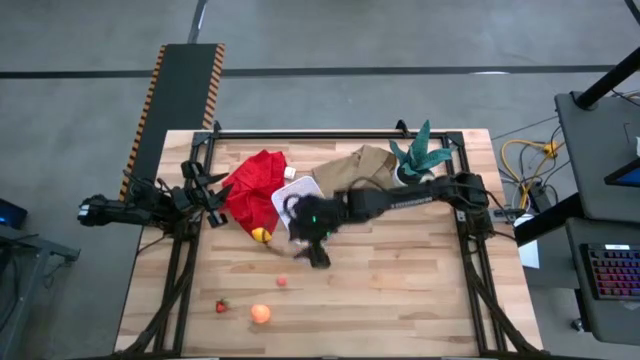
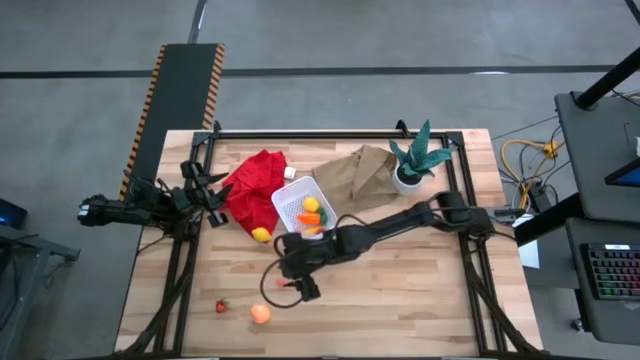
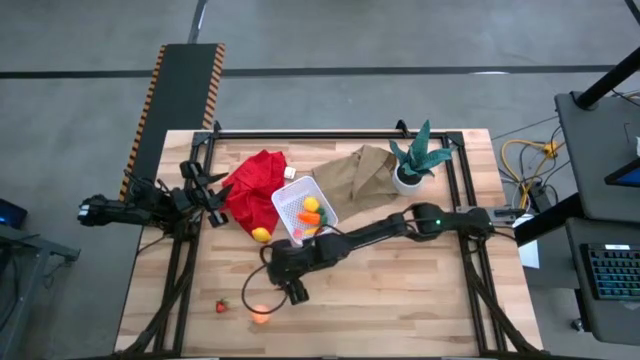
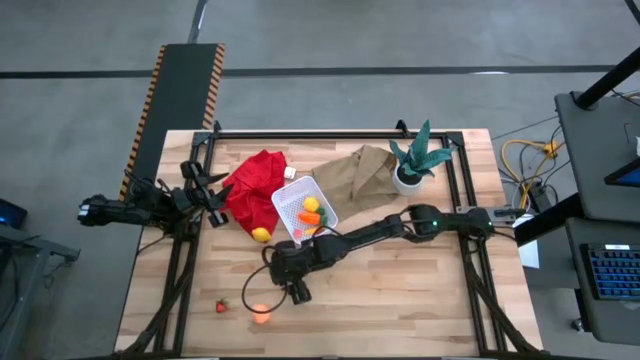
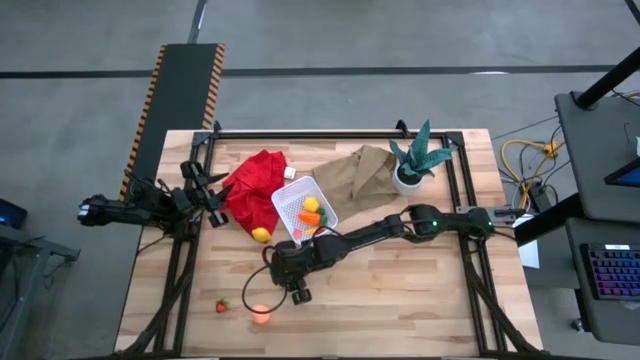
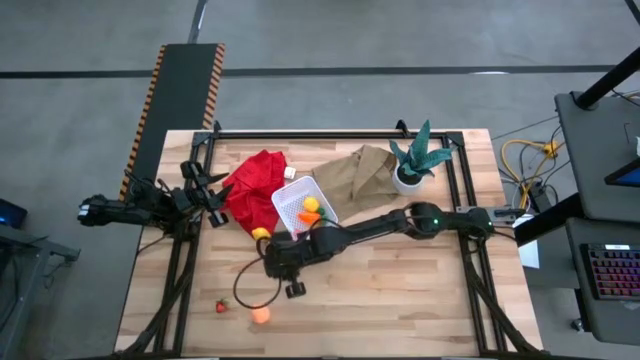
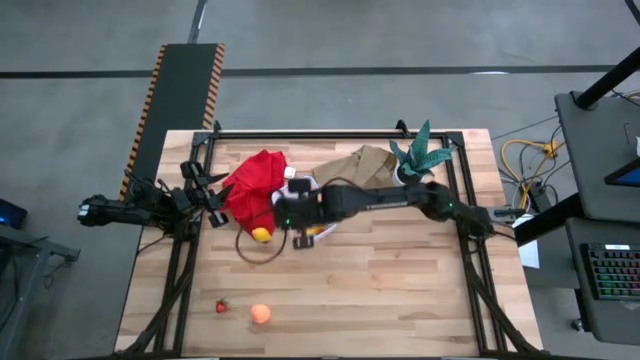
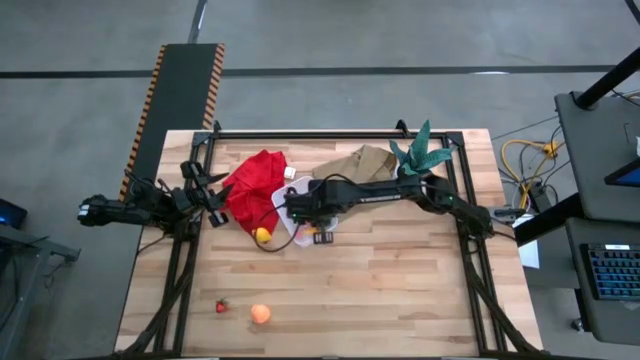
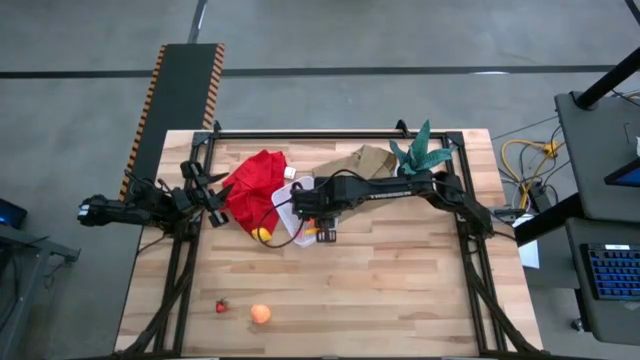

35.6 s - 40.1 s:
Task: Pick and placing Produce into tupperware
Put the toy raspberry into the white bin

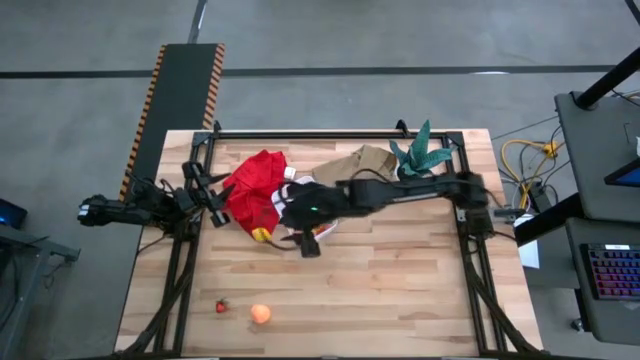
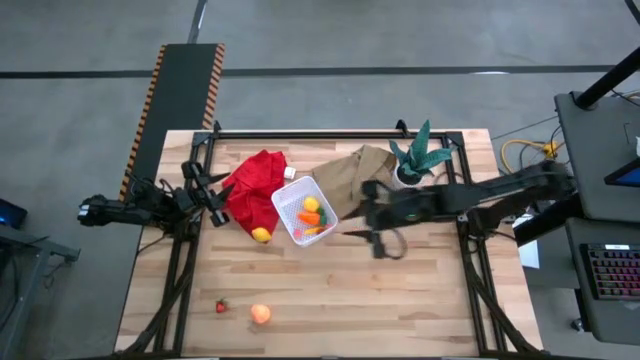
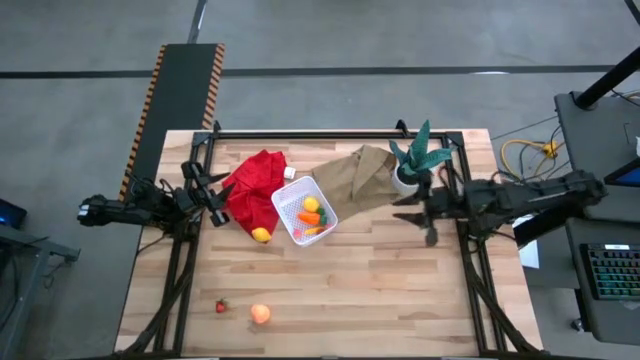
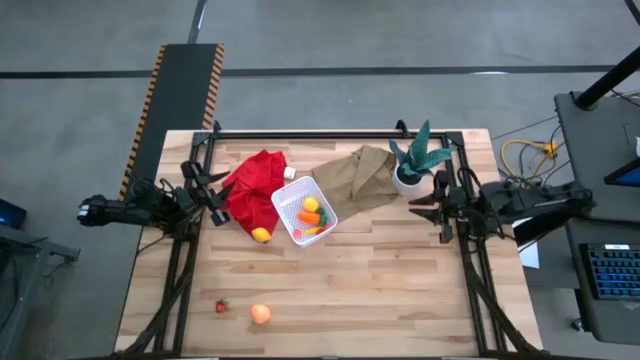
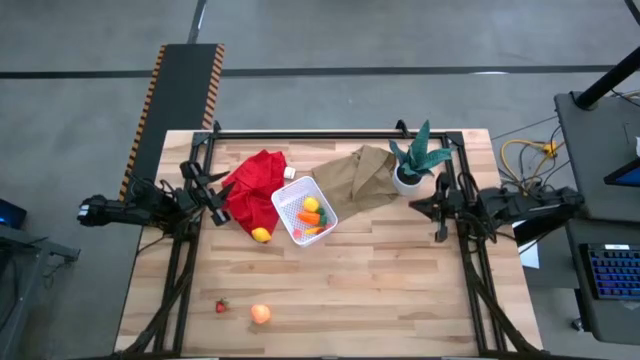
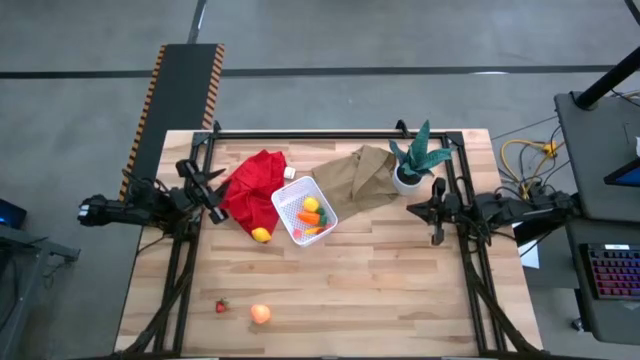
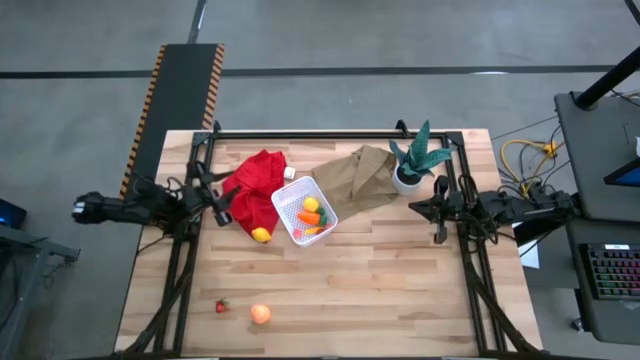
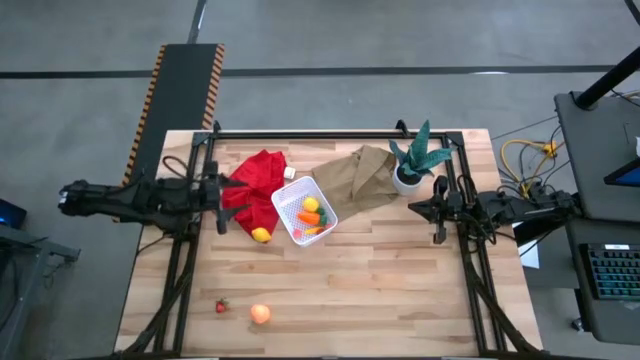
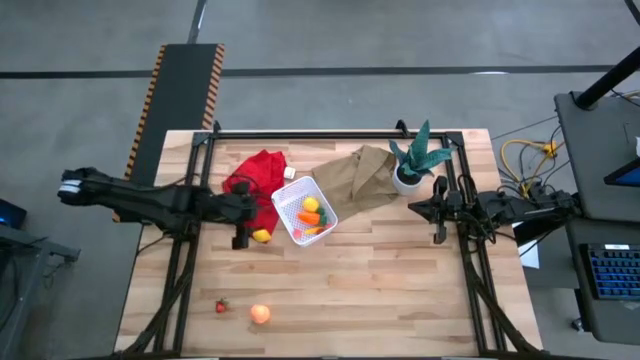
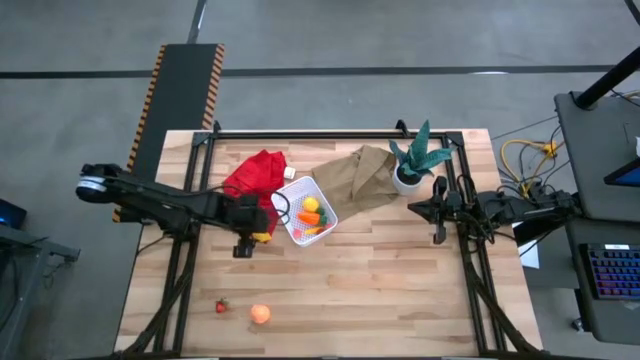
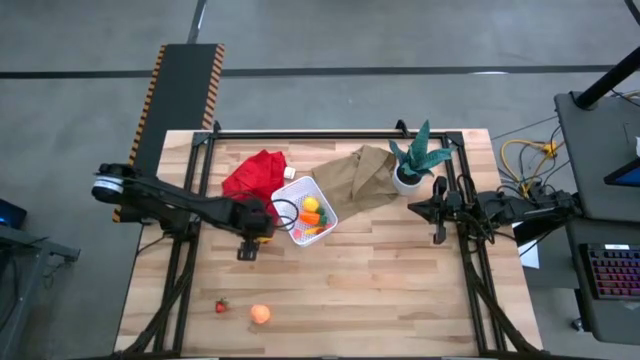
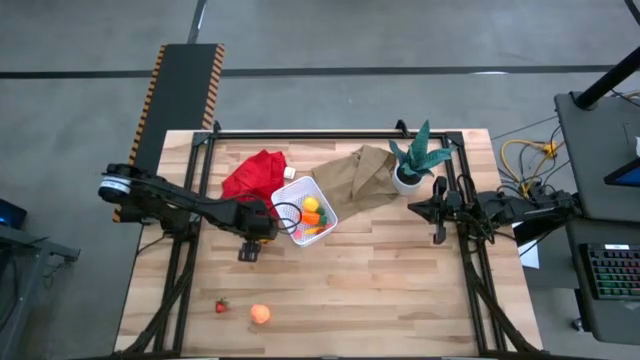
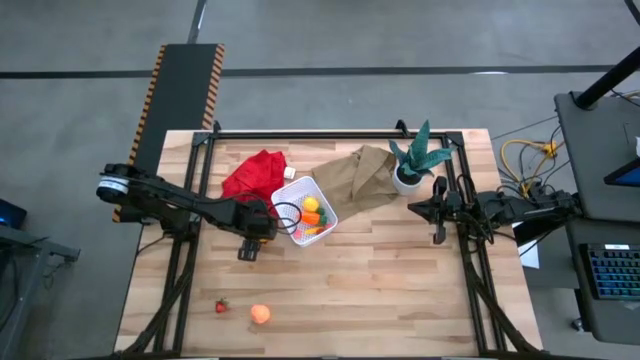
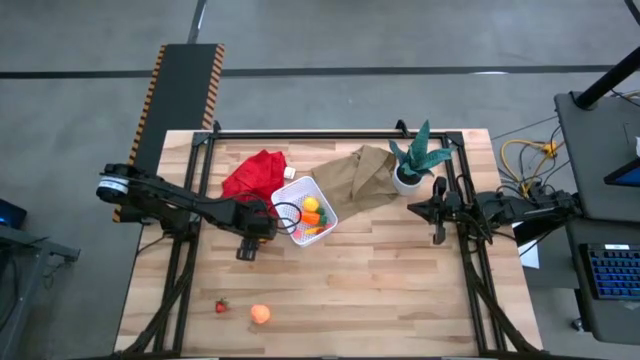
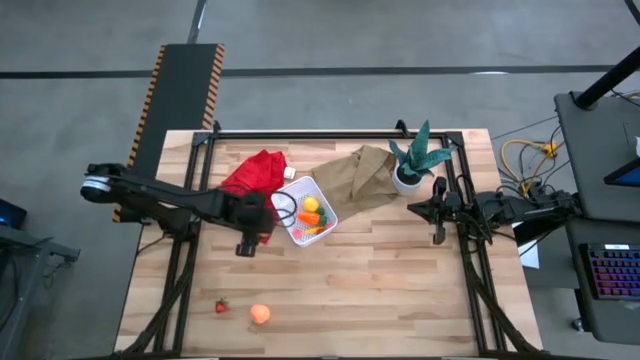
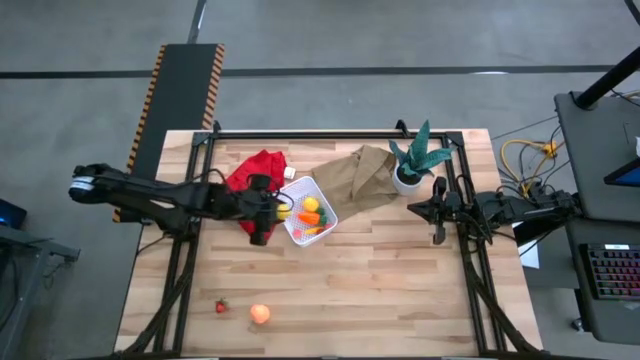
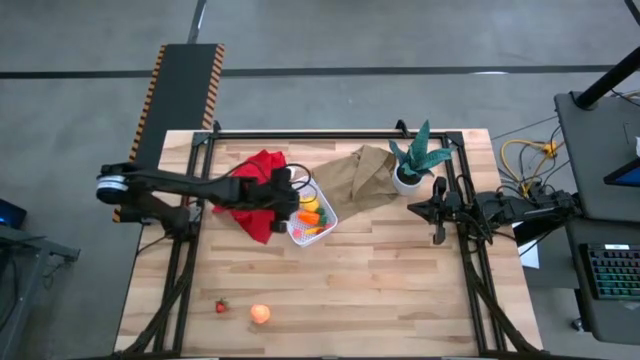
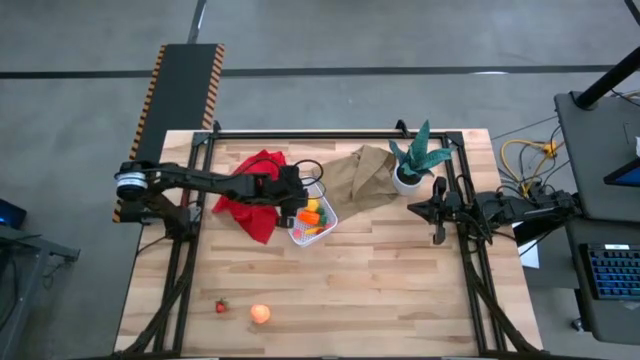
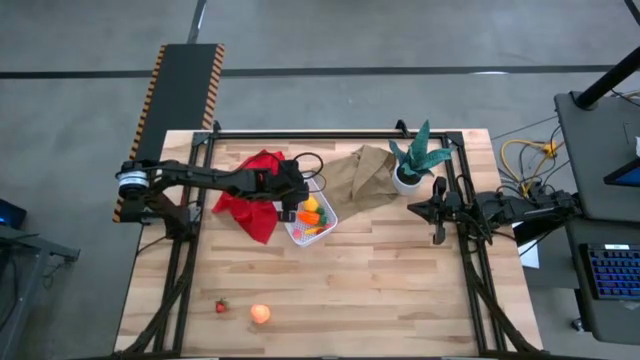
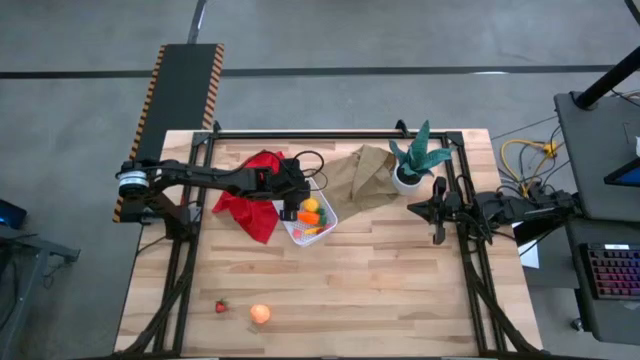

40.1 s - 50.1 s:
Put the toy lemon into the white bin

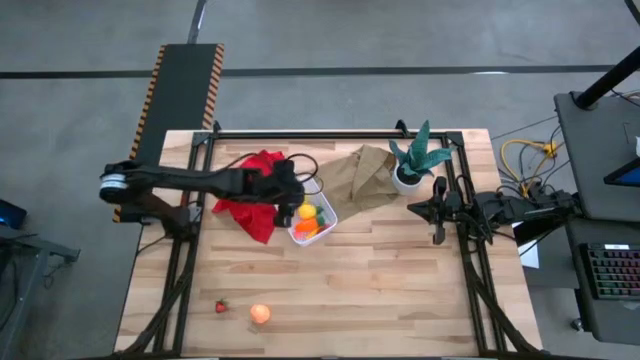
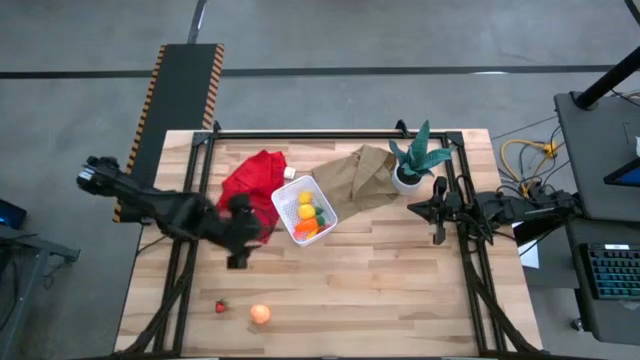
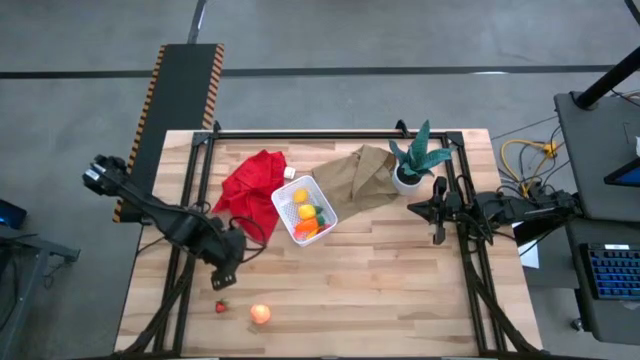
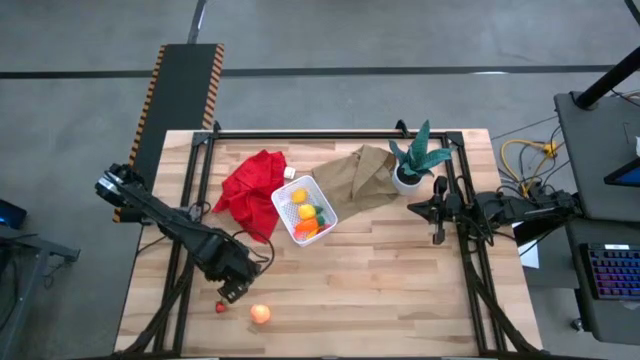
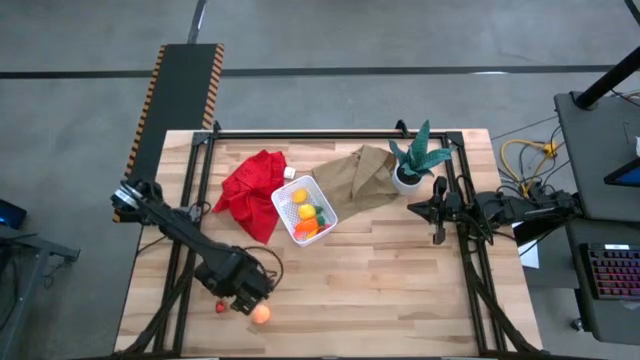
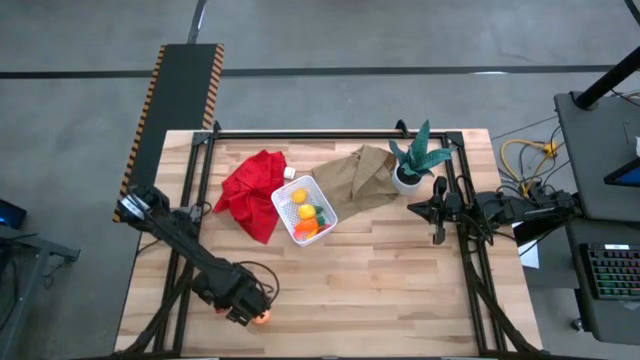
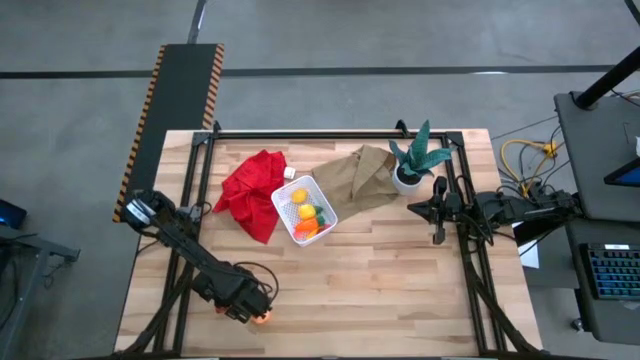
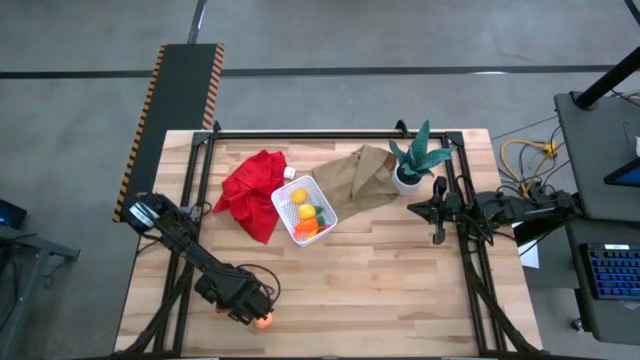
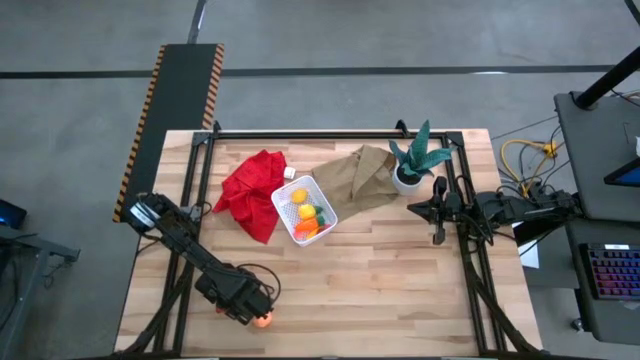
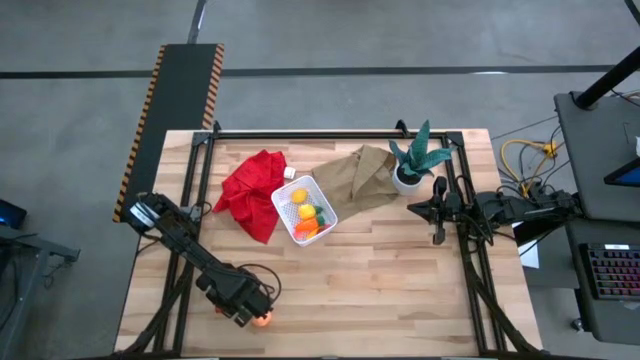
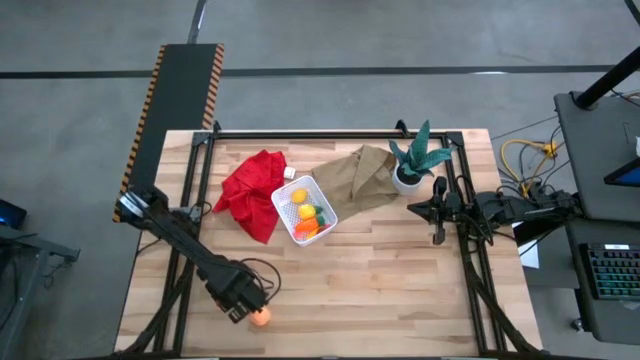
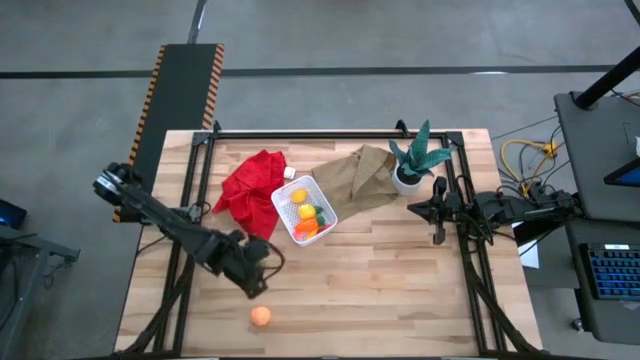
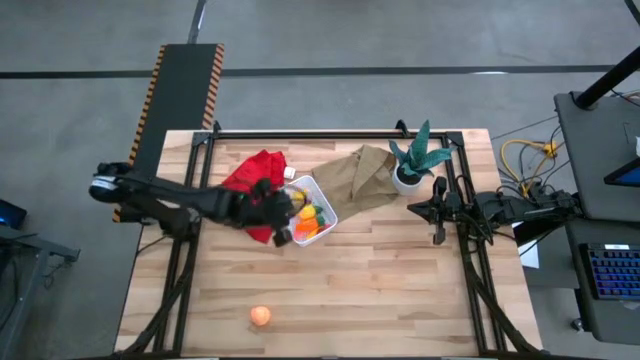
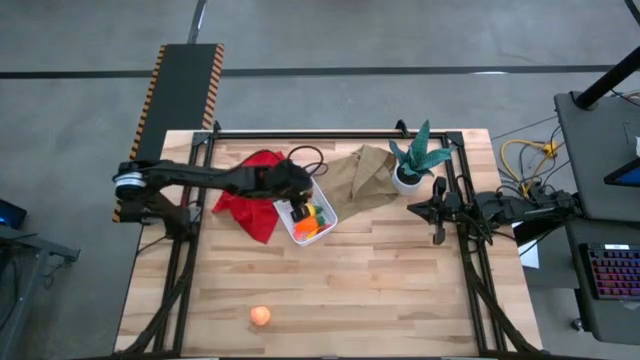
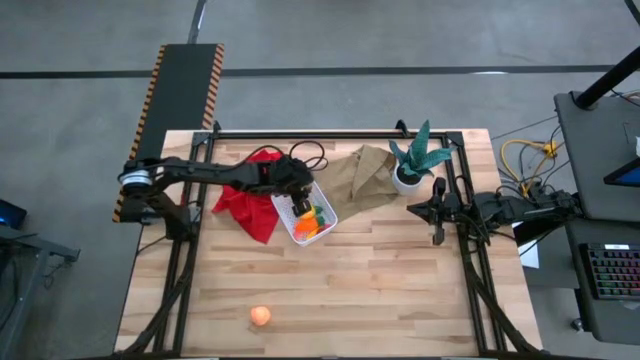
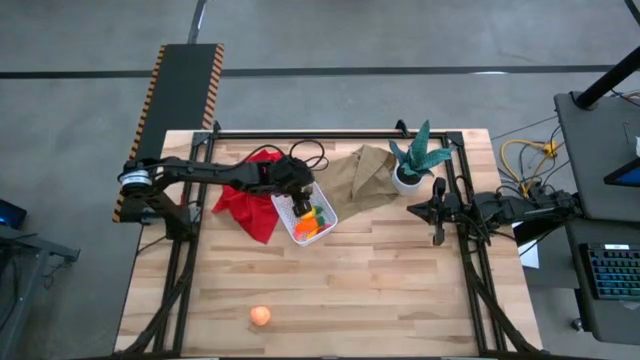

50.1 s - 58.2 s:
Put the toy strawberry into the white bin
